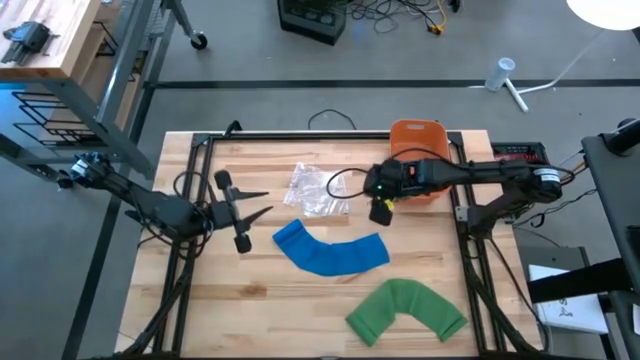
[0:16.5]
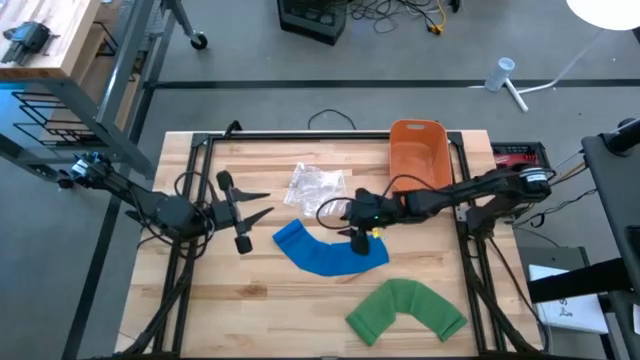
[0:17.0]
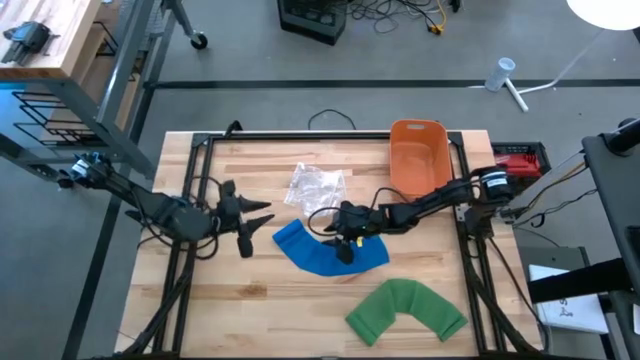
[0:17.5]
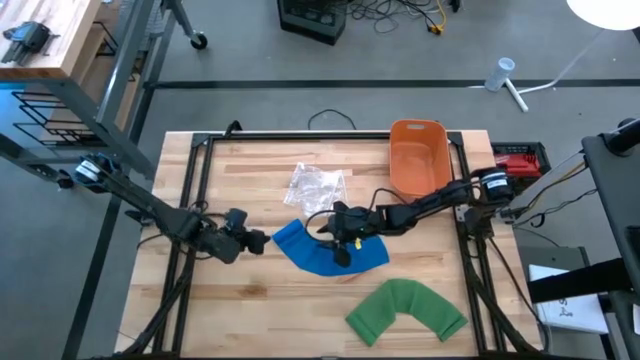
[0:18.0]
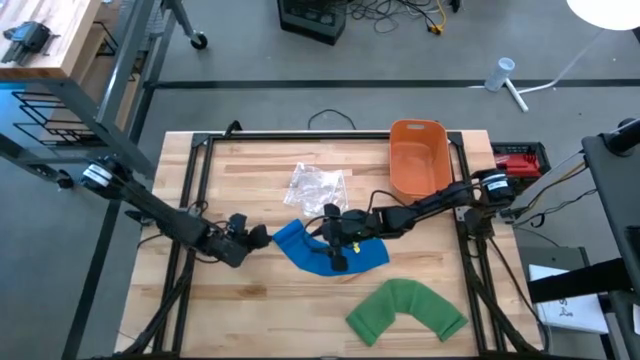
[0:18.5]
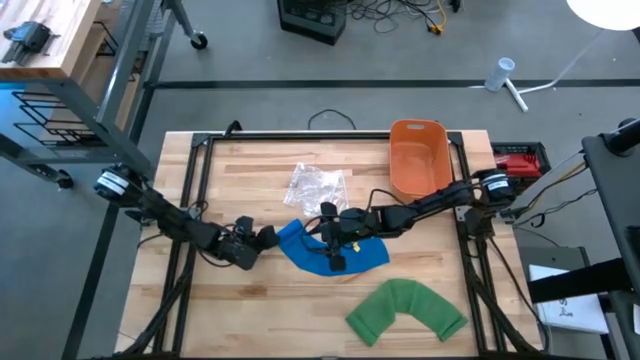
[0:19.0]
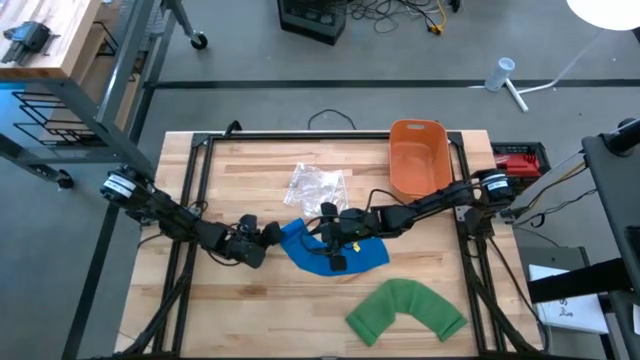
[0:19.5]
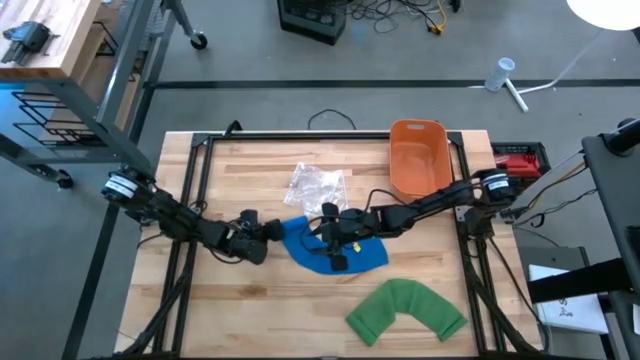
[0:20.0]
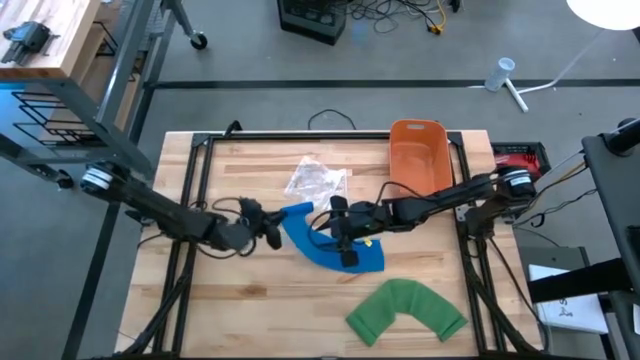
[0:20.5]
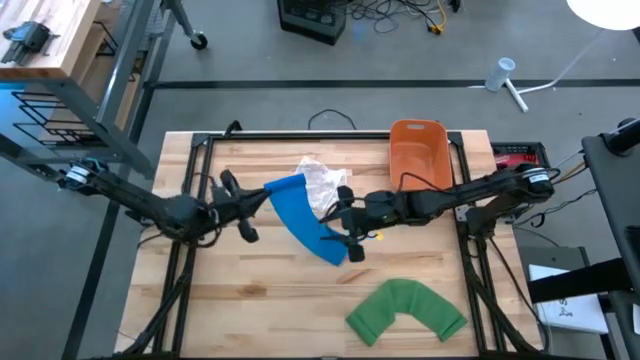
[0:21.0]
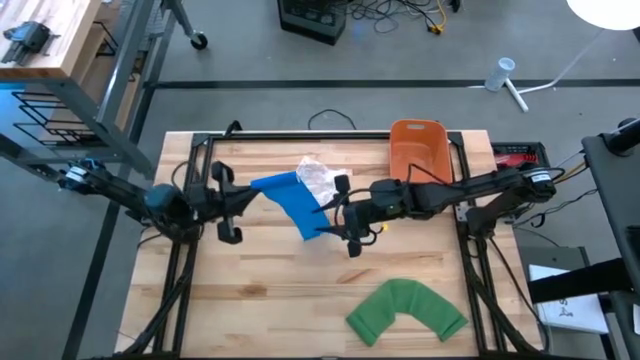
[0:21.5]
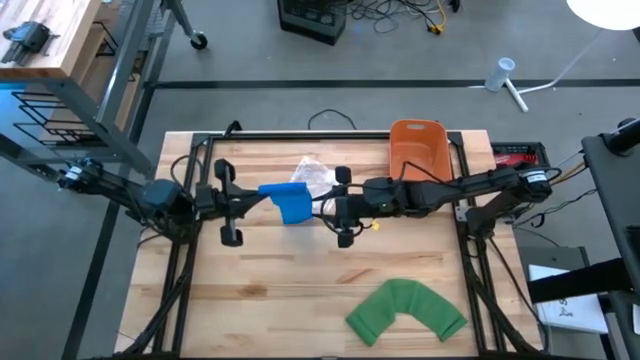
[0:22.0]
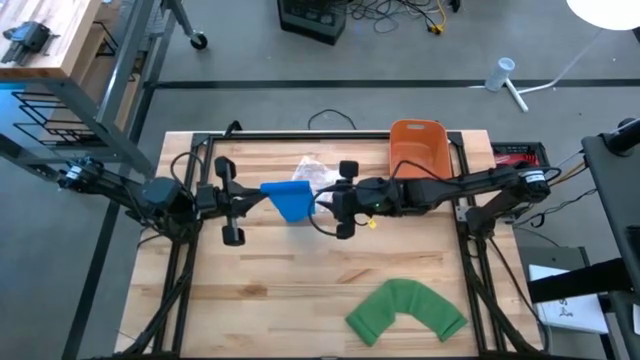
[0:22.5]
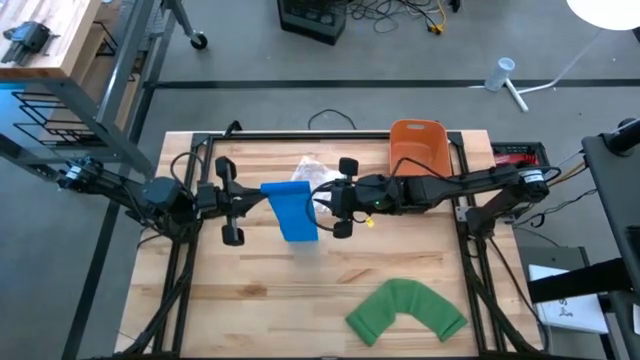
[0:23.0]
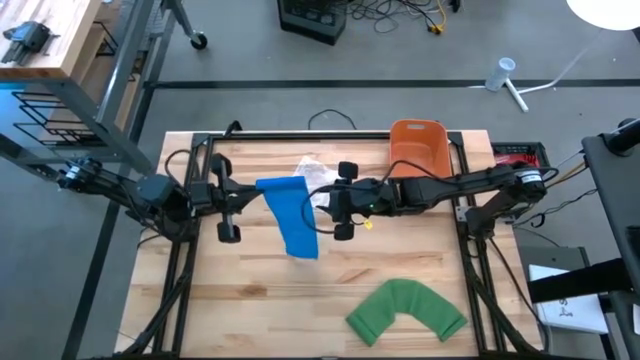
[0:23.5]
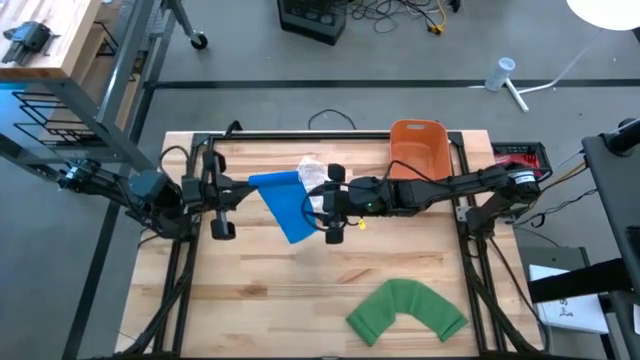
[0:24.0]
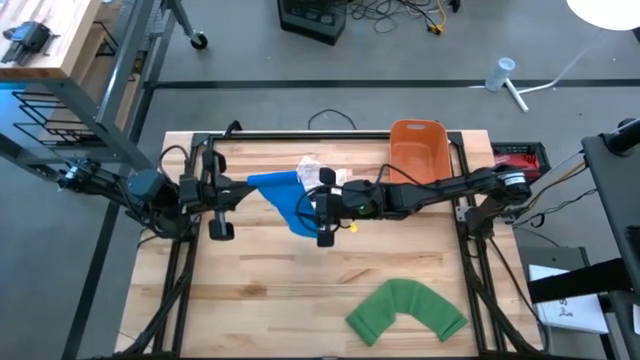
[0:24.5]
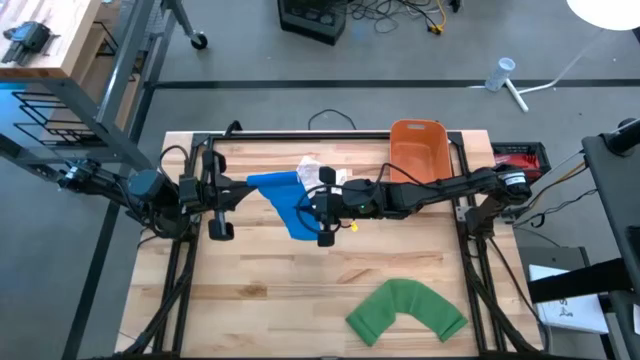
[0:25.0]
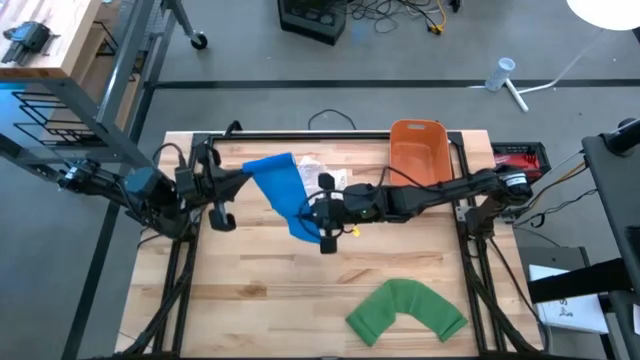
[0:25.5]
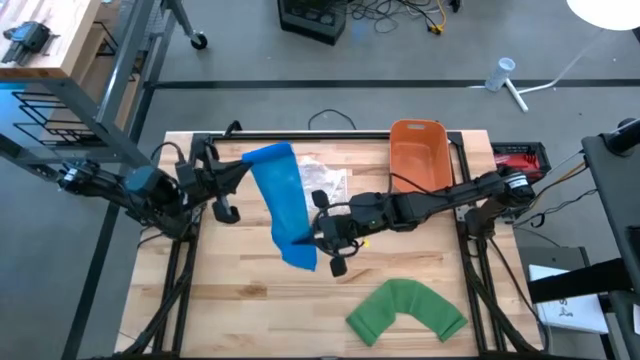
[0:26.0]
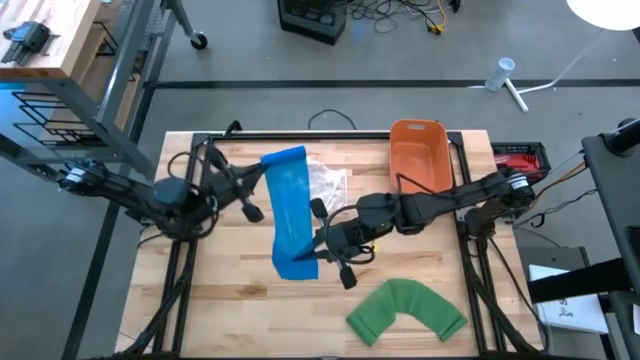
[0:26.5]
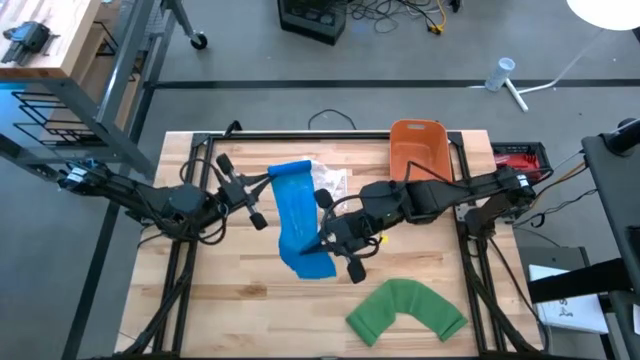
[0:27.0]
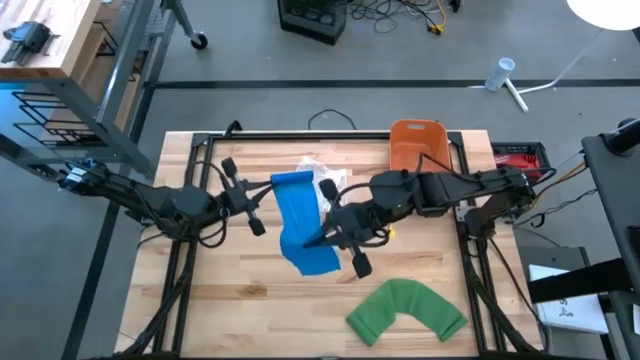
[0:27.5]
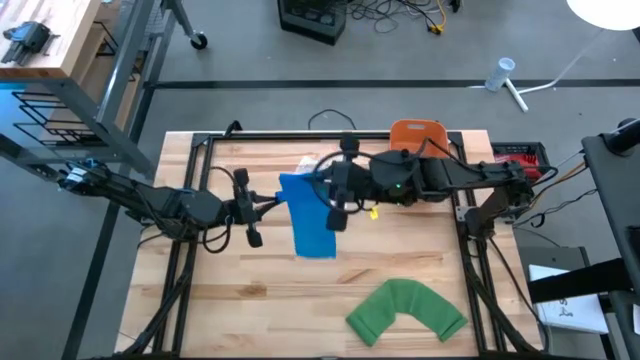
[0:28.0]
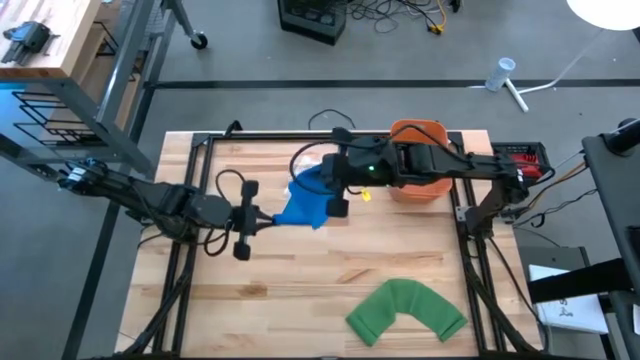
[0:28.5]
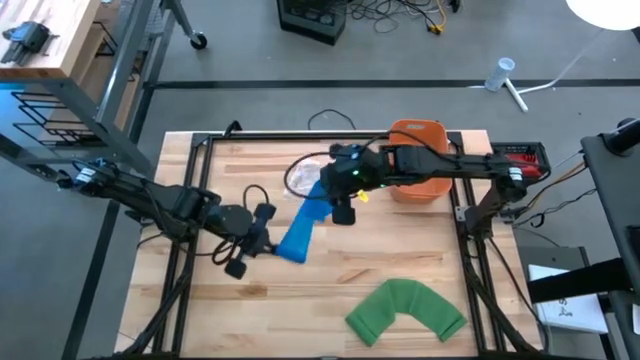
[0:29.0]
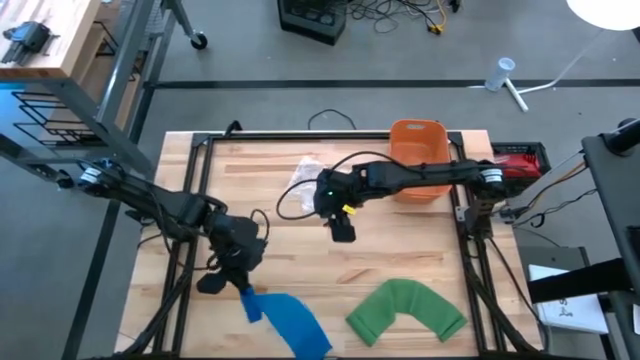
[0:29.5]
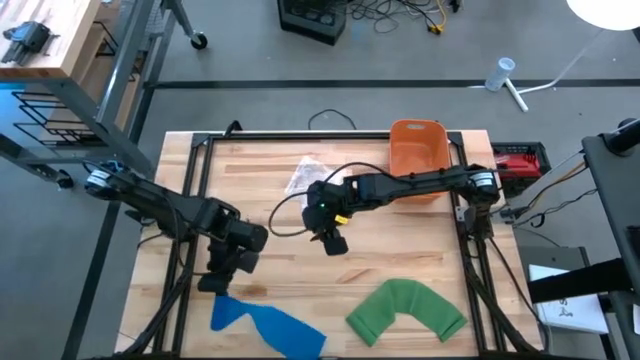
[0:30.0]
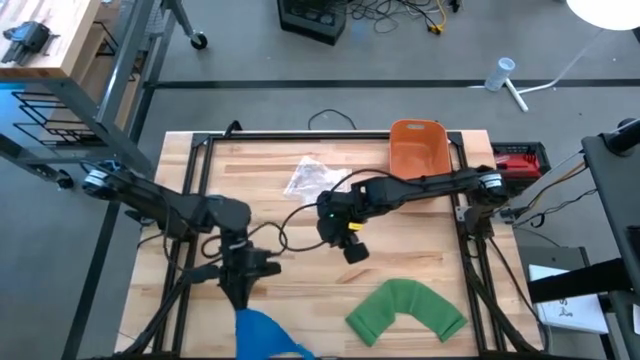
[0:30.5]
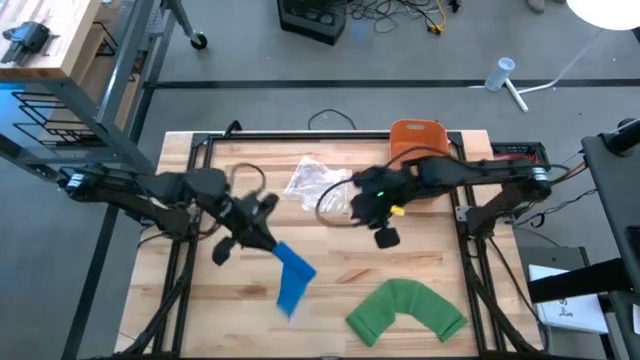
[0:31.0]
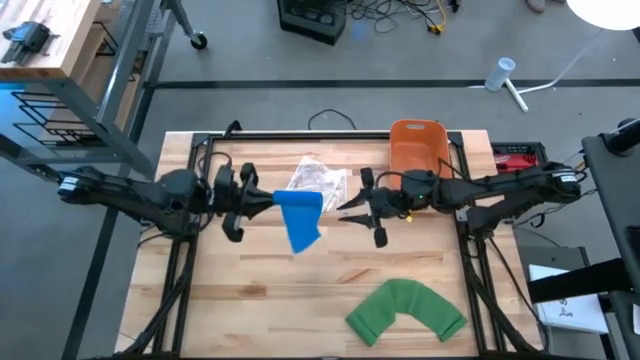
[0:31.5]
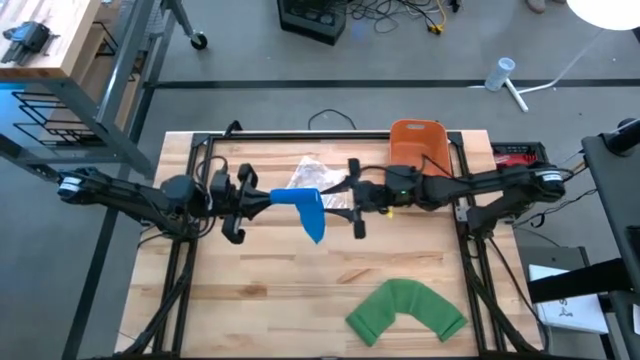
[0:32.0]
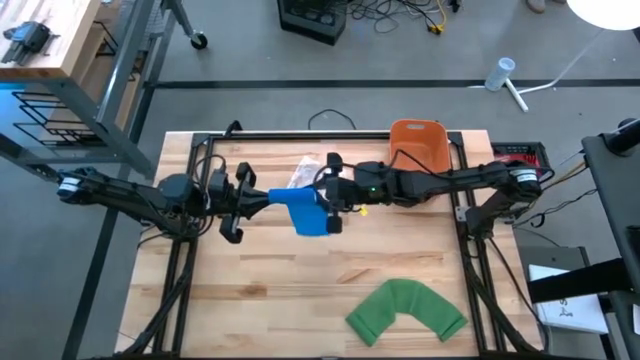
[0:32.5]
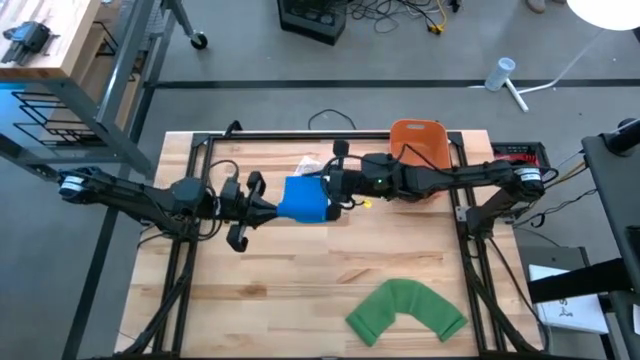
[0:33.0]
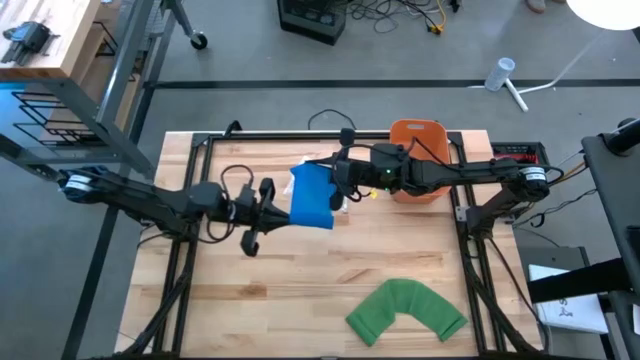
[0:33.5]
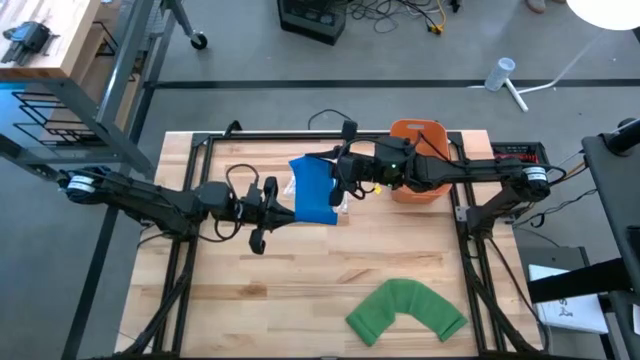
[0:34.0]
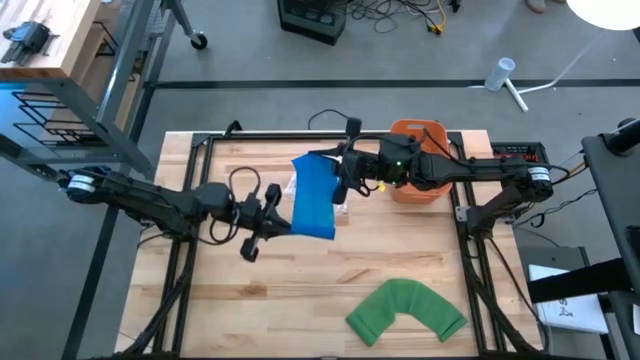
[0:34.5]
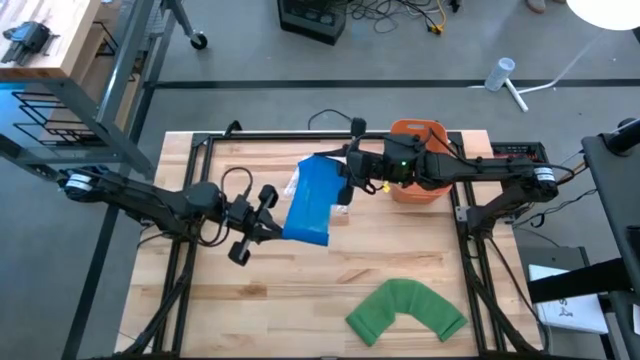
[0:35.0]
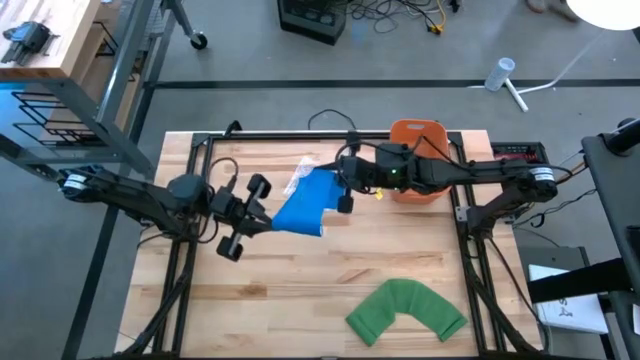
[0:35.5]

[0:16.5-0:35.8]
Task: Roll bandage
Roll the blue bandage
